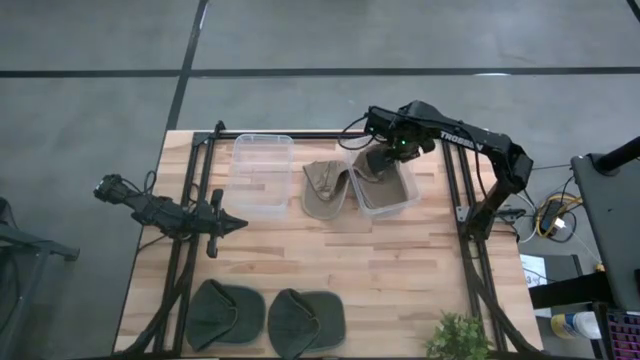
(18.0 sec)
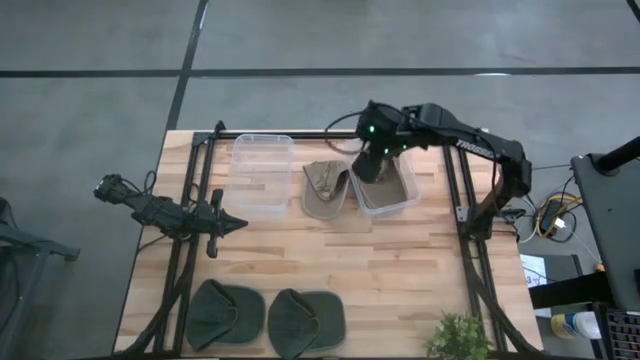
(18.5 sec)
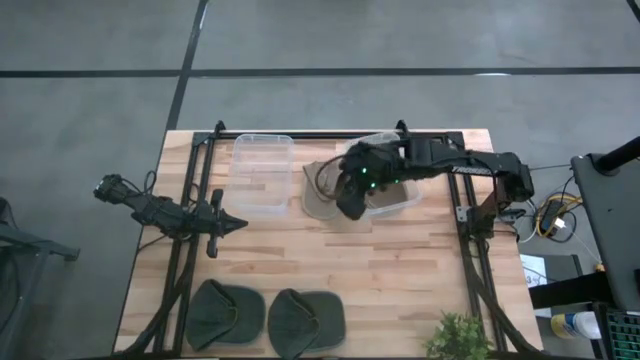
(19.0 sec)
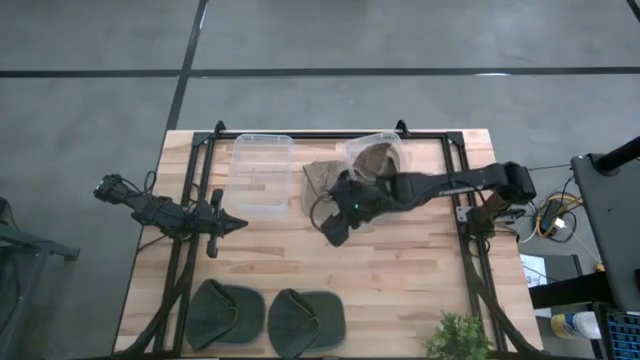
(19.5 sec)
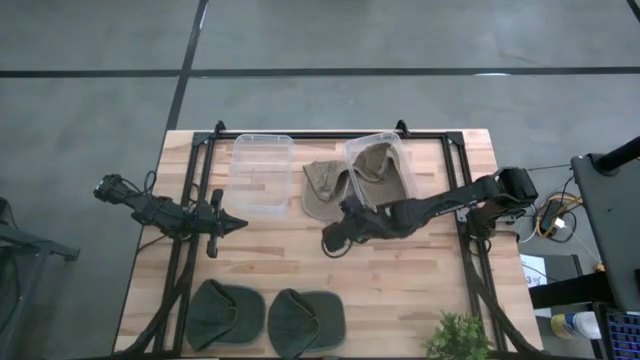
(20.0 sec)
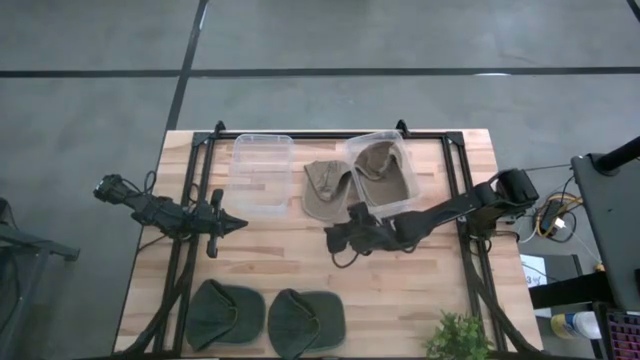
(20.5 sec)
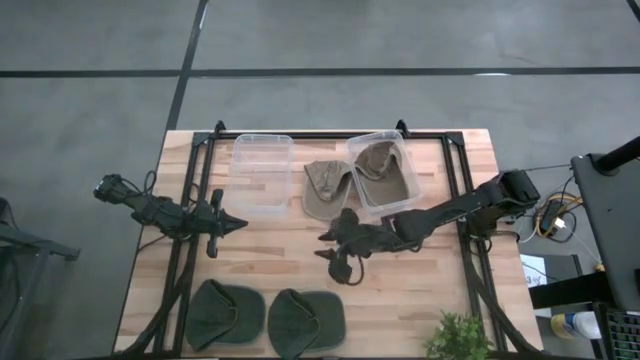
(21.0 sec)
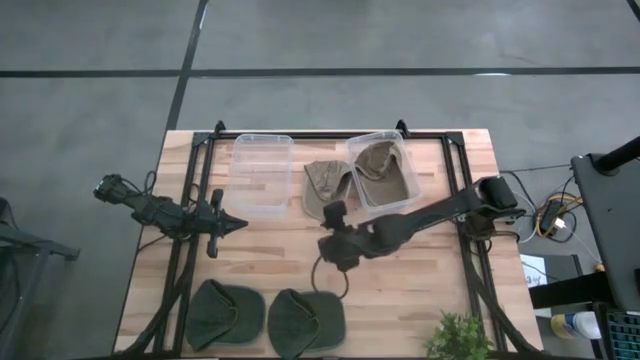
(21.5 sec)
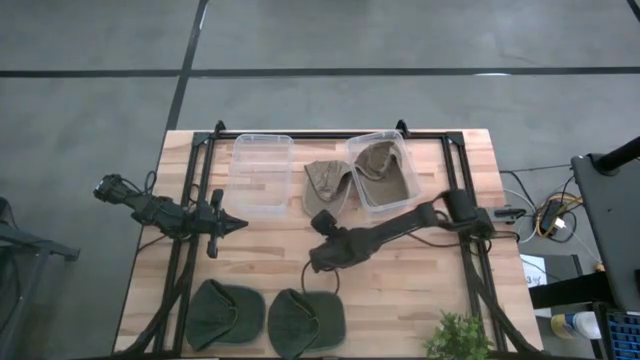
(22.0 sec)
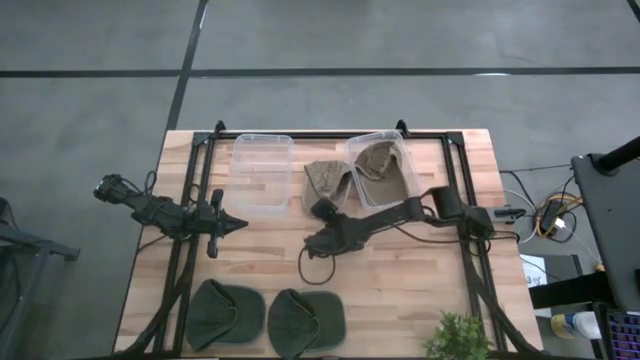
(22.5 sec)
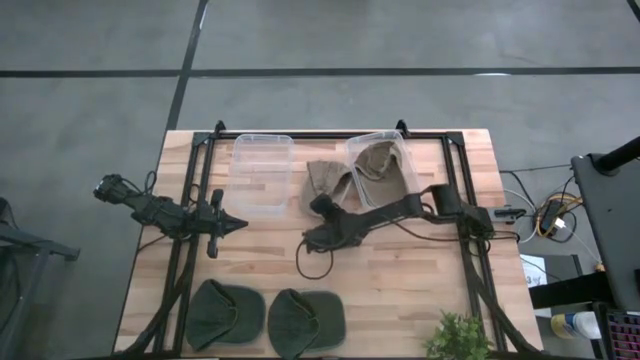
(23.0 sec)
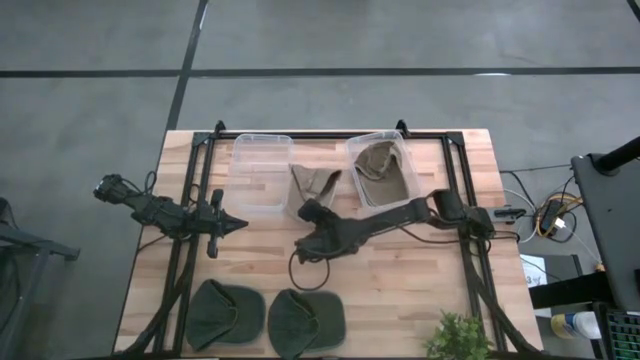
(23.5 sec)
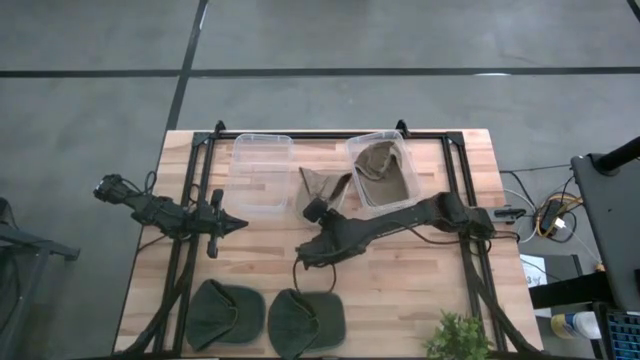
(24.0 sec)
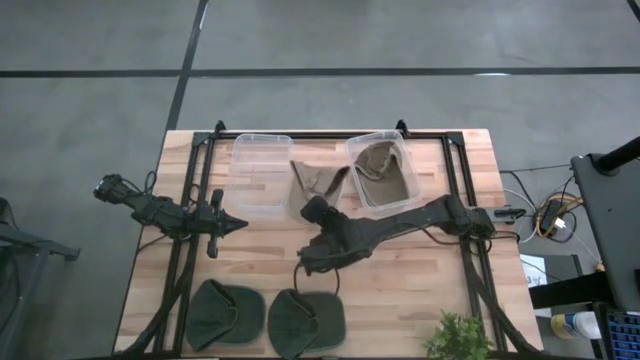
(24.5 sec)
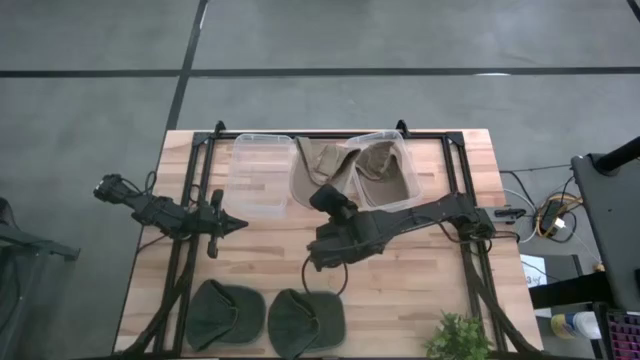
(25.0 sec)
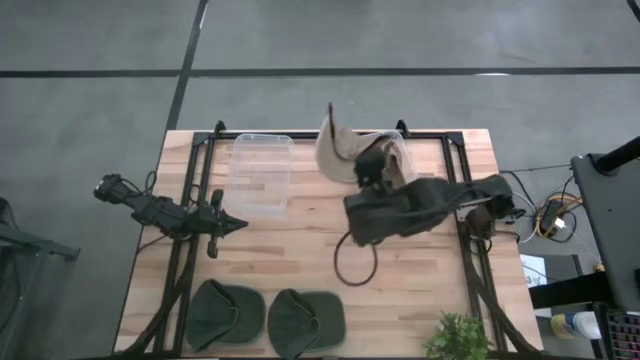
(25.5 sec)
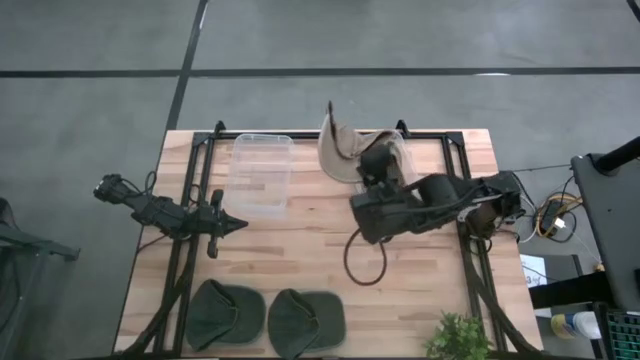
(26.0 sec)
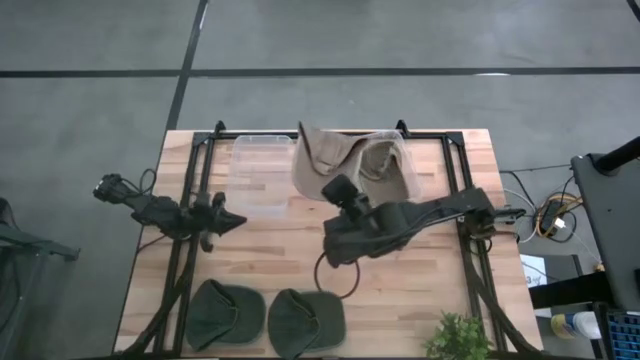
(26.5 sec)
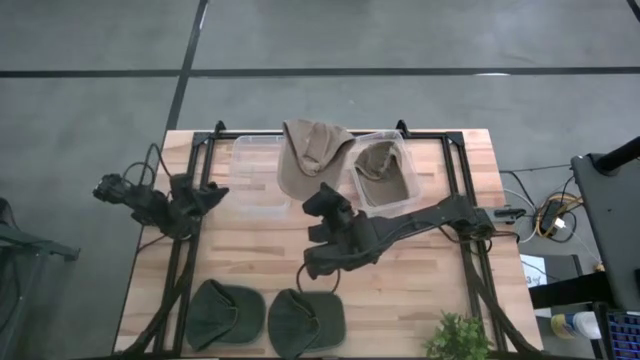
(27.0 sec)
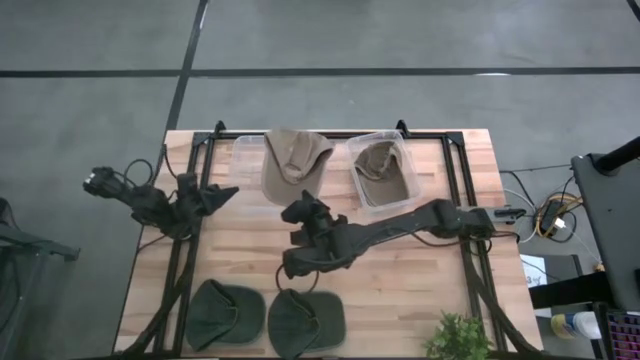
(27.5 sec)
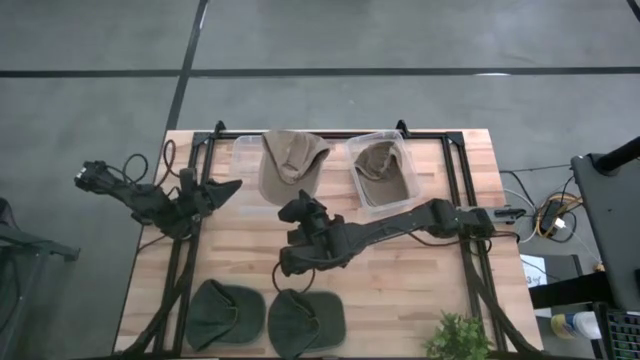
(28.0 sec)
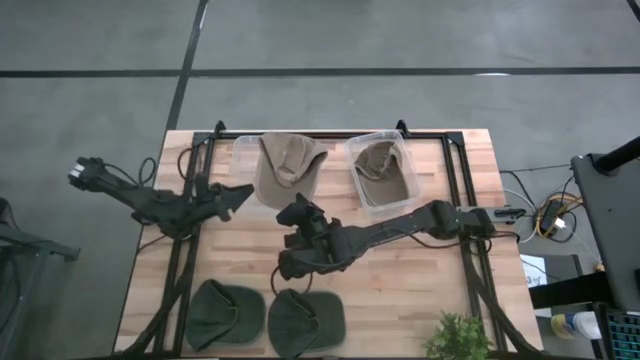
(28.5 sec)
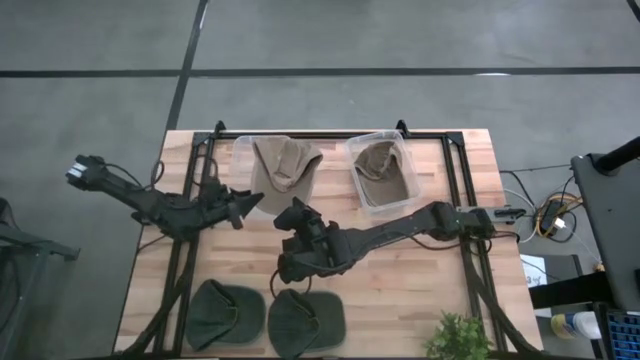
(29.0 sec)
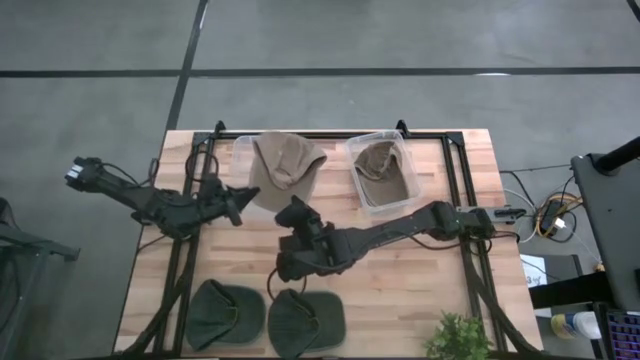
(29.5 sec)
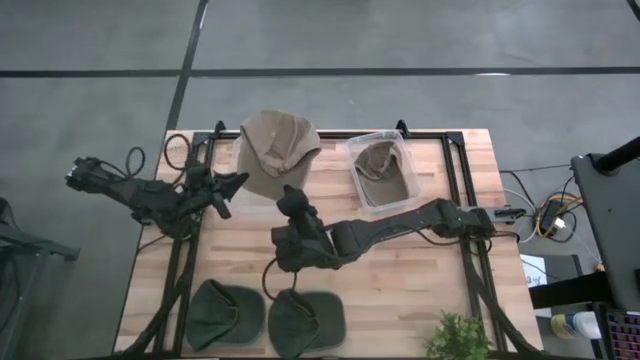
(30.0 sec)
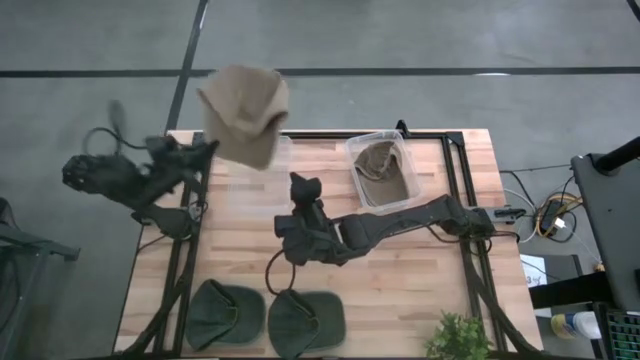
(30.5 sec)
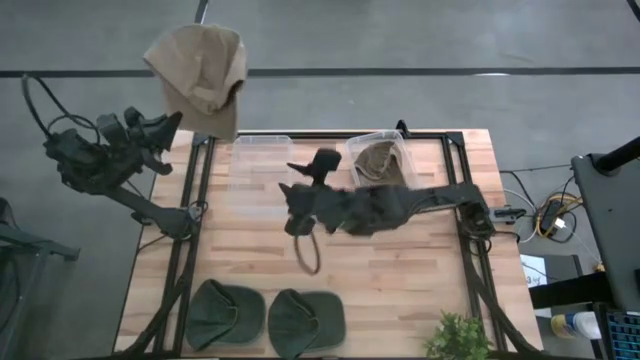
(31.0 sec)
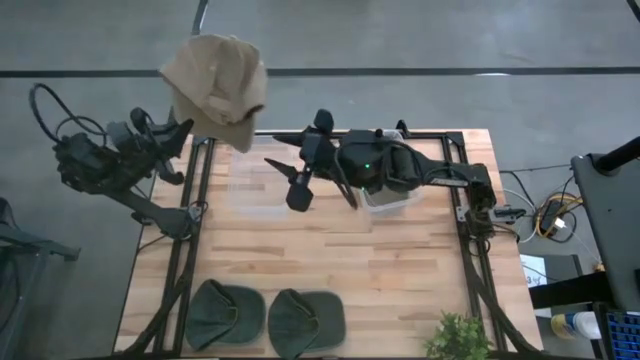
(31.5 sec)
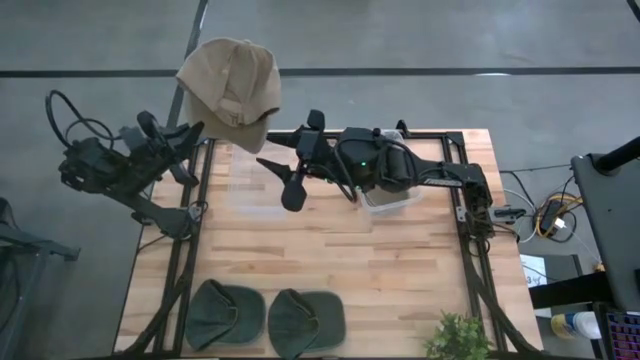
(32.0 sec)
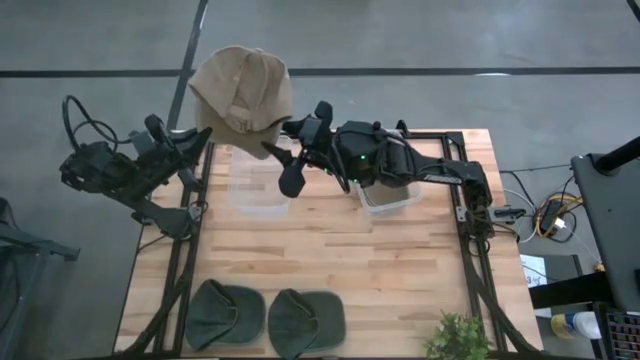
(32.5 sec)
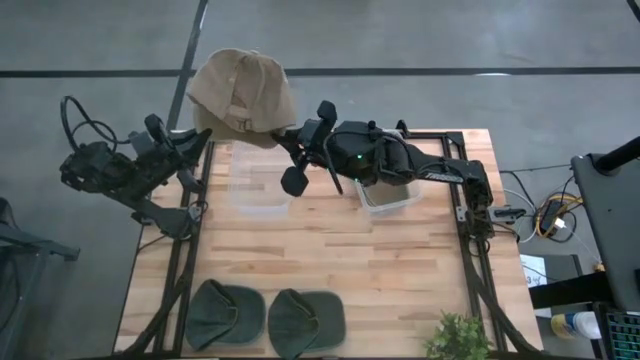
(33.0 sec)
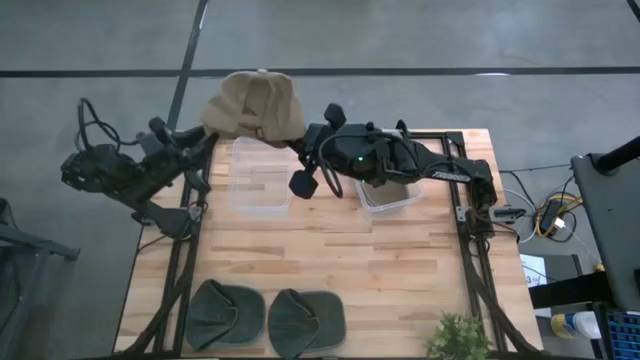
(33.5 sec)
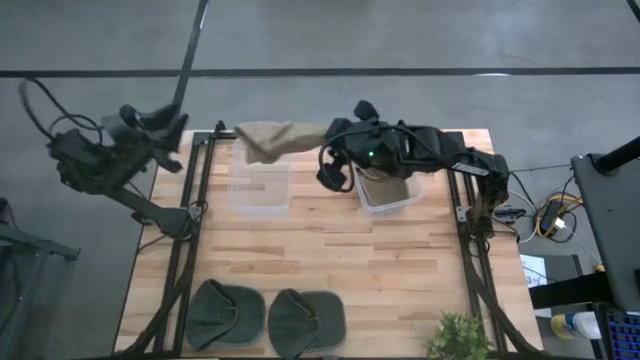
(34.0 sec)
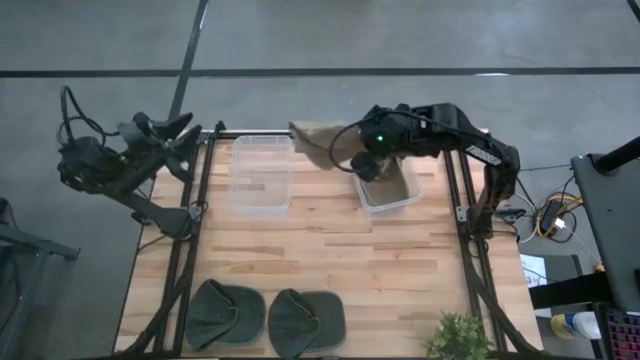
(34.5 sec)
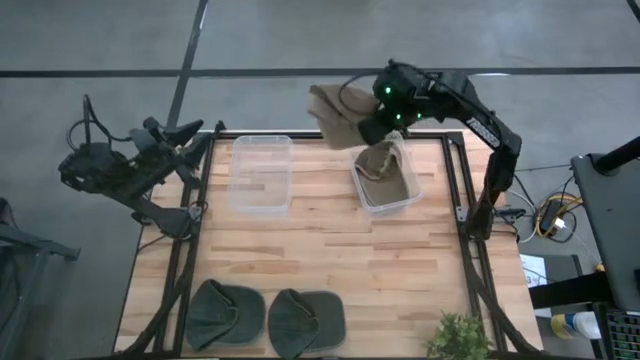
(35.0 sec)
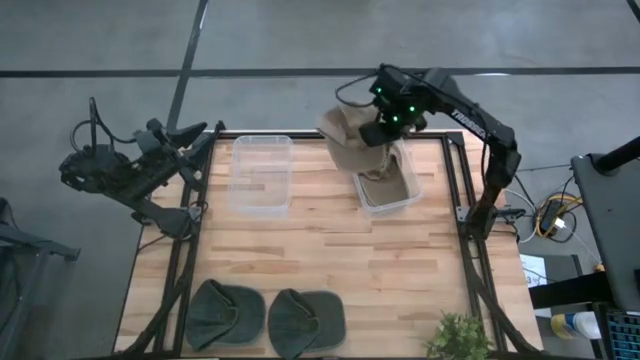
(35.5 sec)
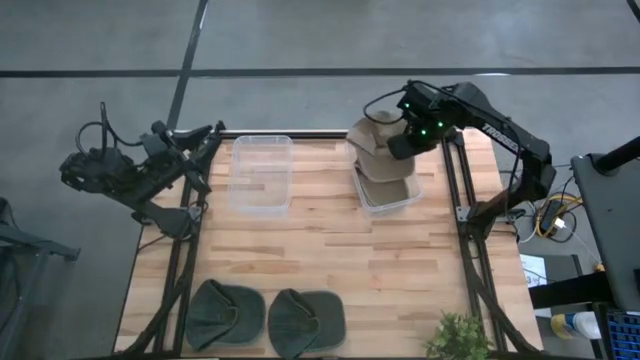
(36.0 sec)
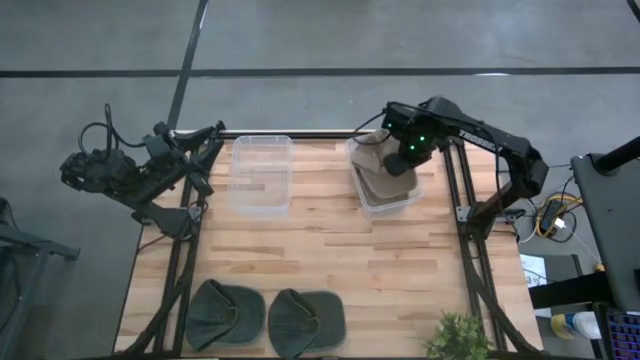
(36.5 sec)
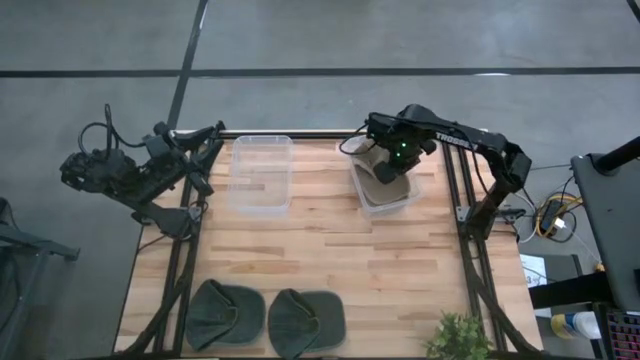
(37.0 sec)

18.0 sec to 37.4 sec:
Task: Pick & Place hat
Put the brown cap into the right transparent bin
